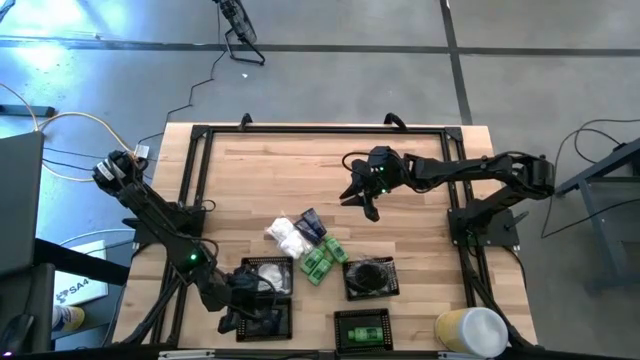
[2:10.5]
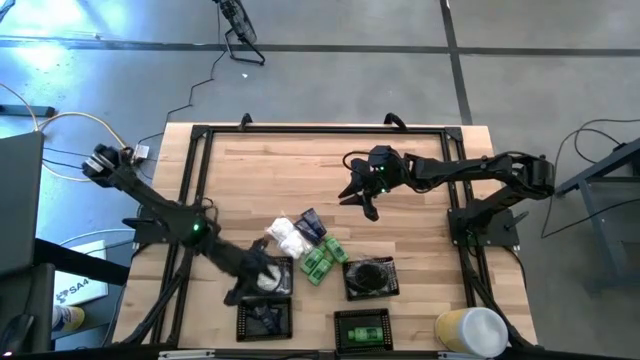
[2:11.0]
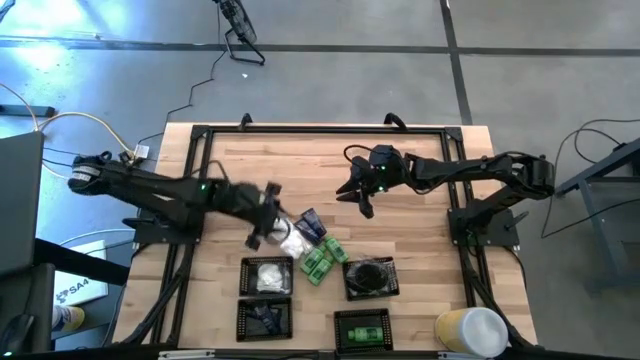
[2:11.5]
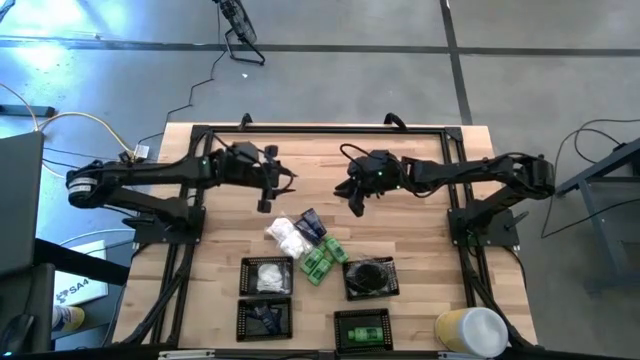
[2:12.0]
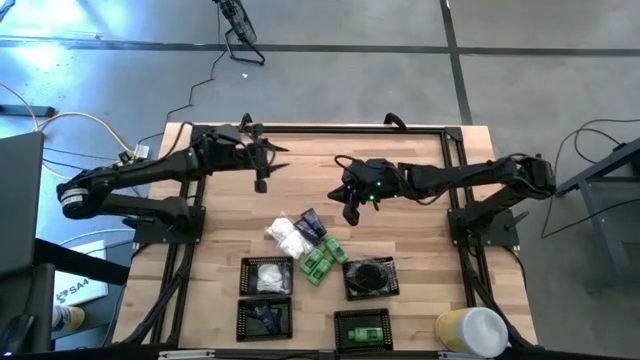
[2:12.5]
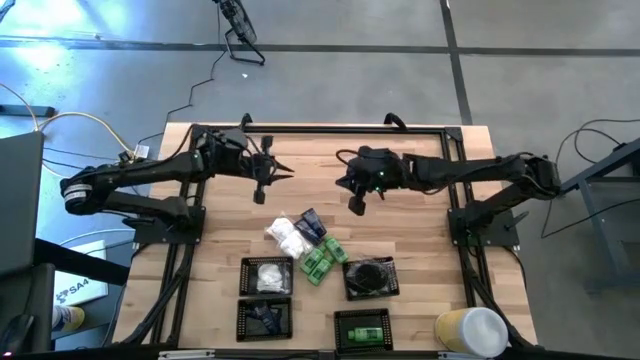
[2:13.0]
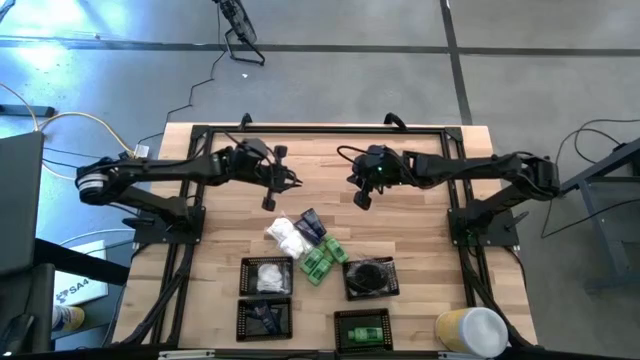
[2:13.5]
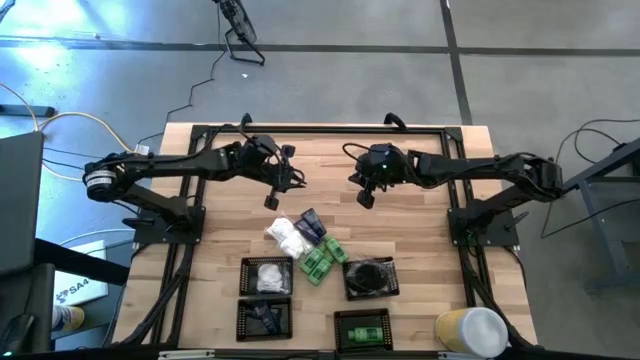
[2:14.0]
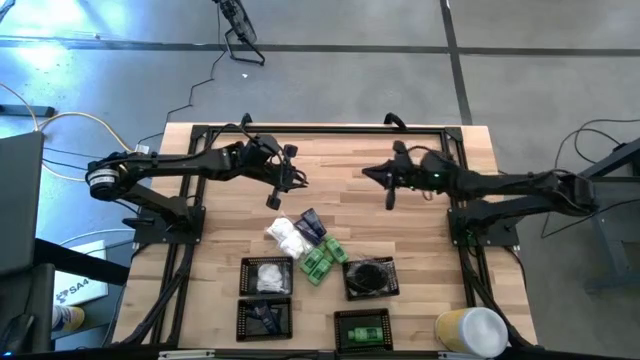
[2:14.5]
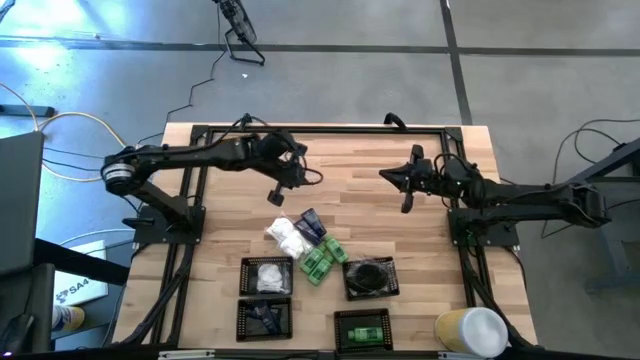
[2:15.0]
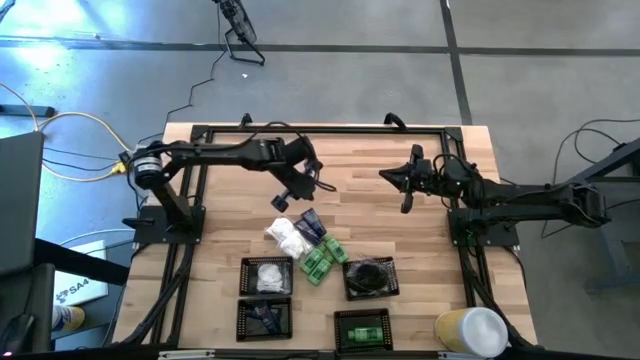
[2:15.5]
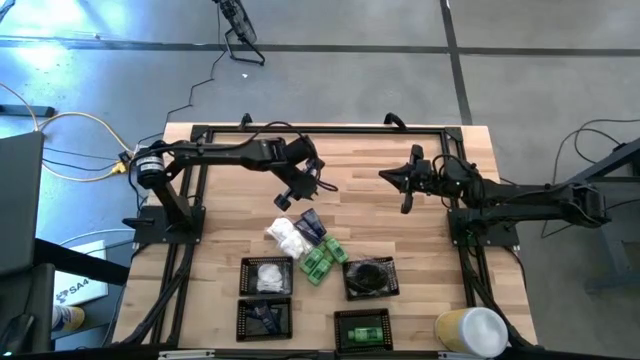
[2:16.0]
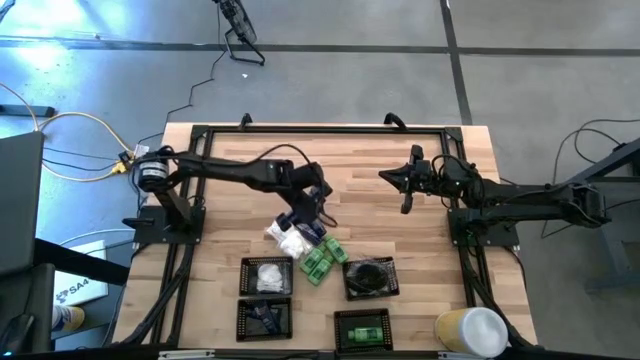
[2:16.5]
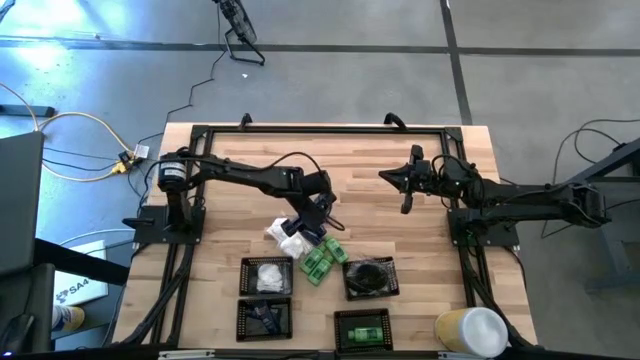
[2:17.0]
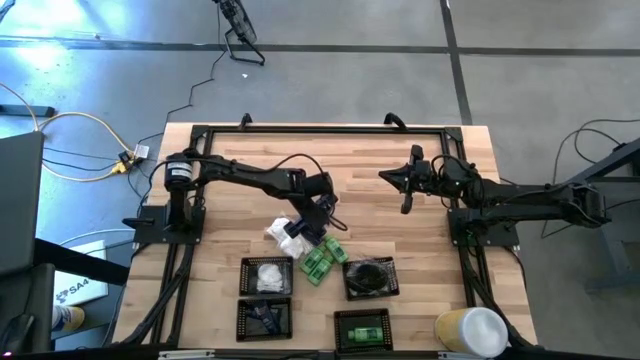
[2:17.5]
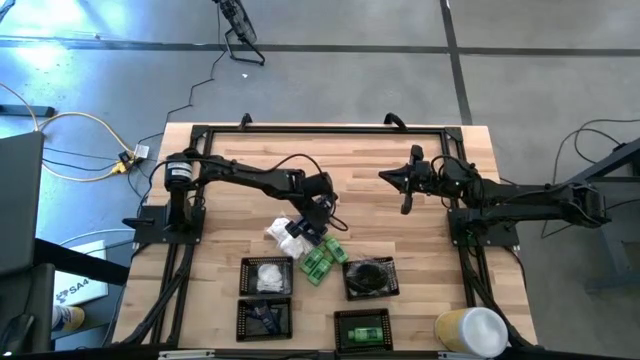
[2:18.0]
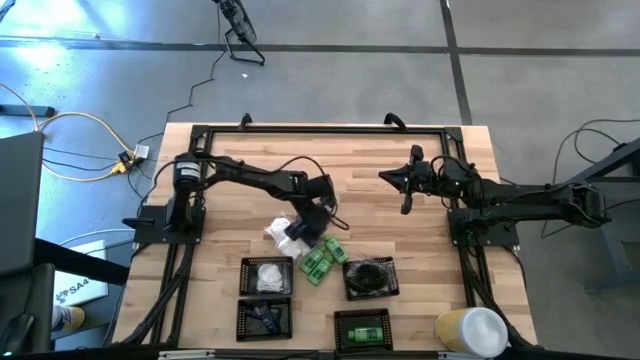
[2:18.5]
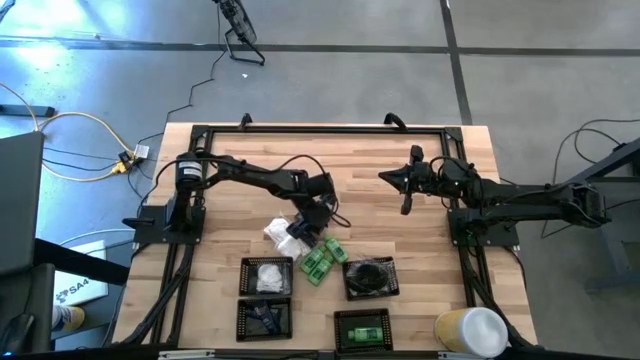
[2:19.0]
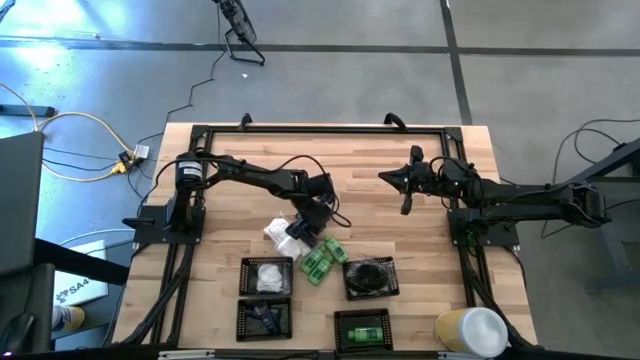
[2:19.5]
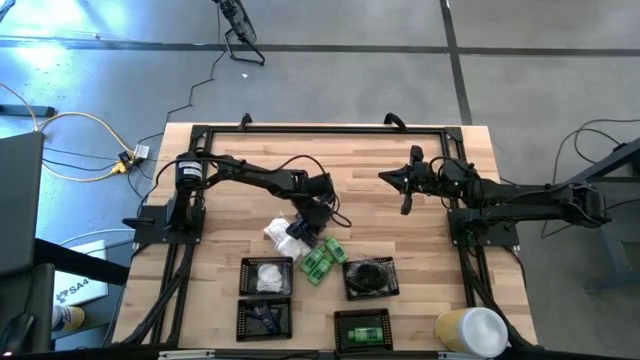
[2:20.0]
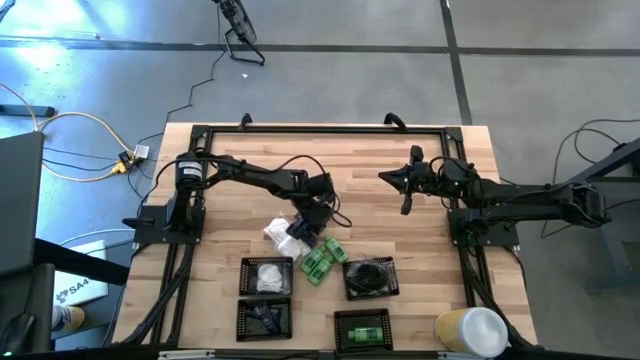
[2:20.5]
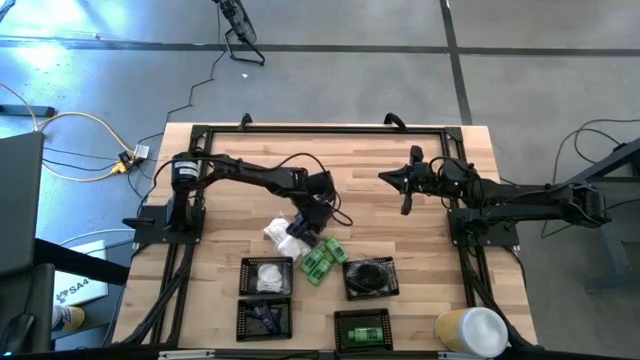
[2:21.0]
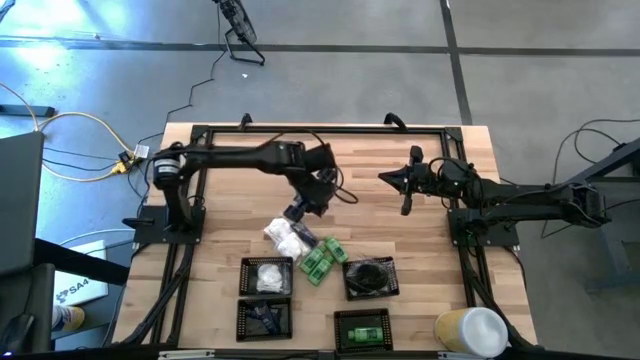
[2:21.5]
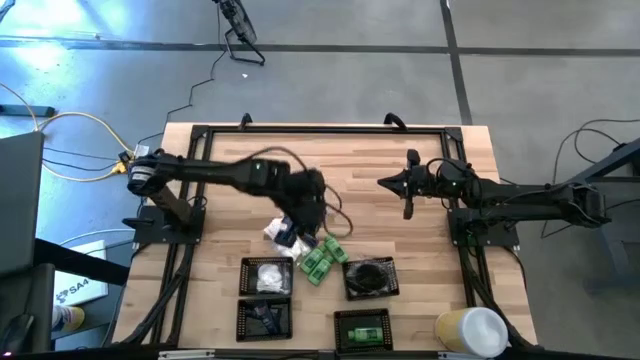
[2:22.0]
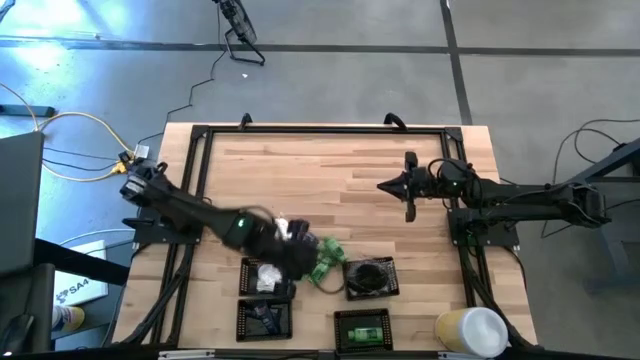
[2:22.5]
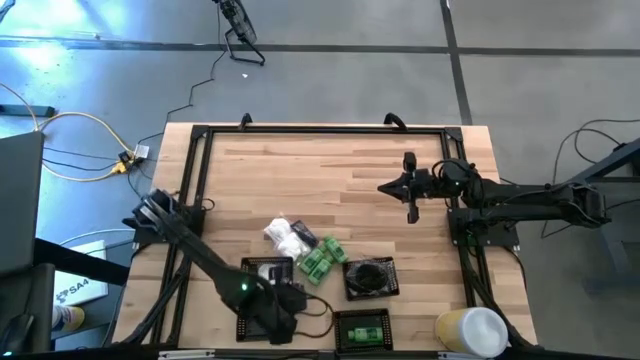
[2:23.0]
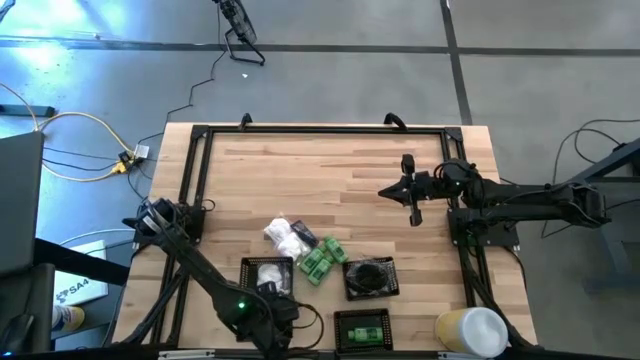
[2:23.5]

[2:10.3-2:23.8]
Task: Pick & Place Travel size toiletries
Put the black shaving cream into the bottom left black bin

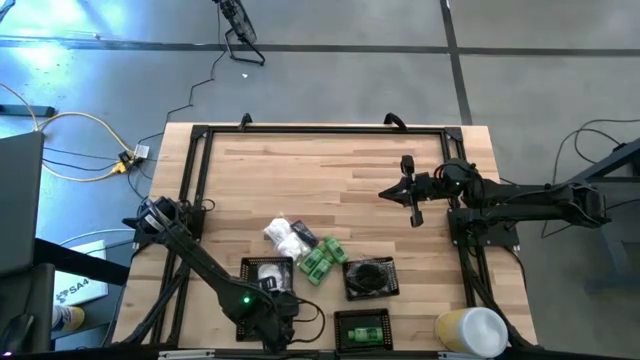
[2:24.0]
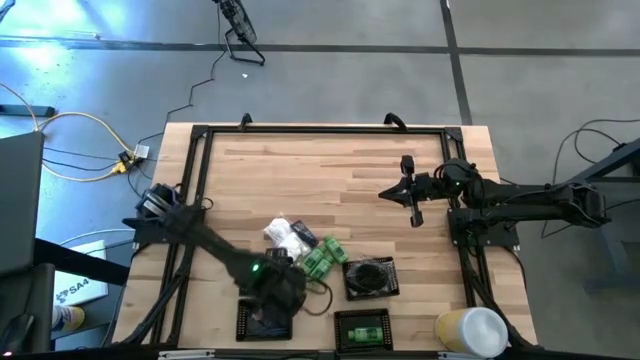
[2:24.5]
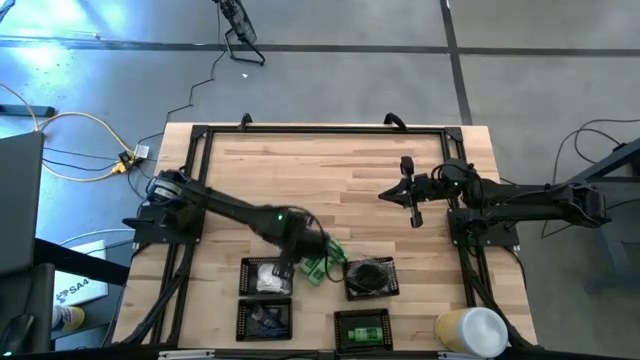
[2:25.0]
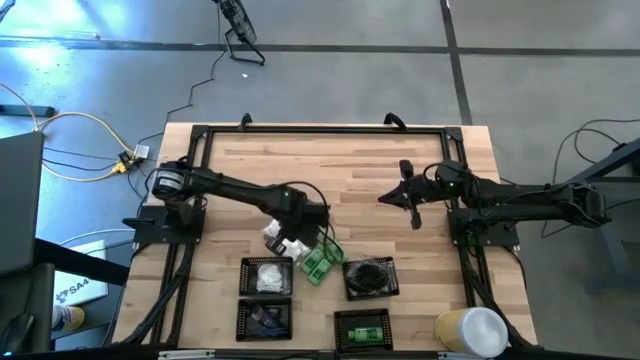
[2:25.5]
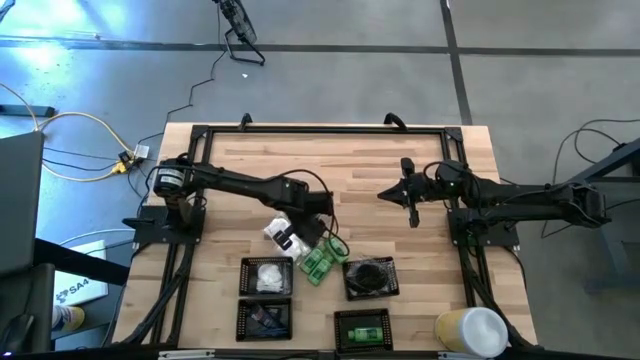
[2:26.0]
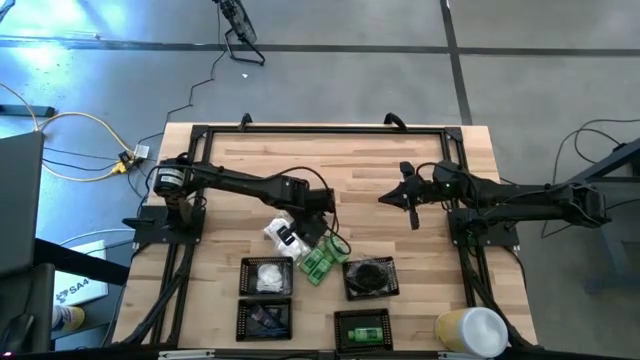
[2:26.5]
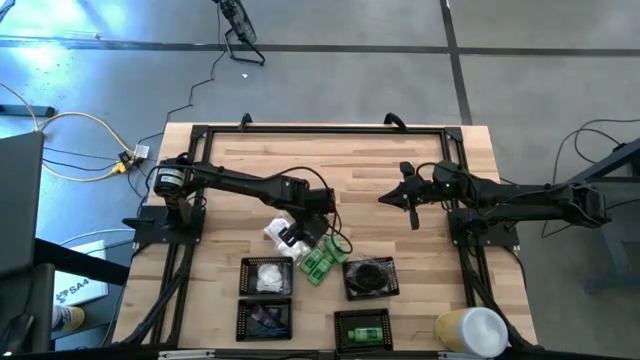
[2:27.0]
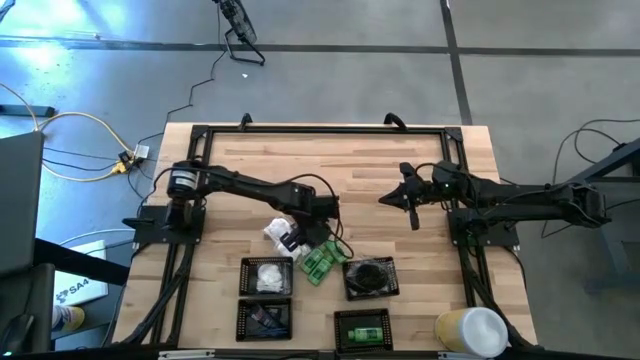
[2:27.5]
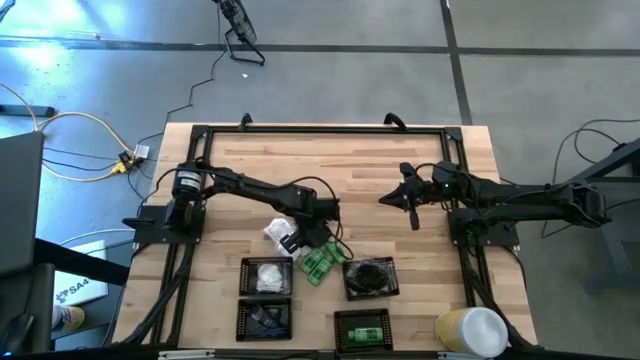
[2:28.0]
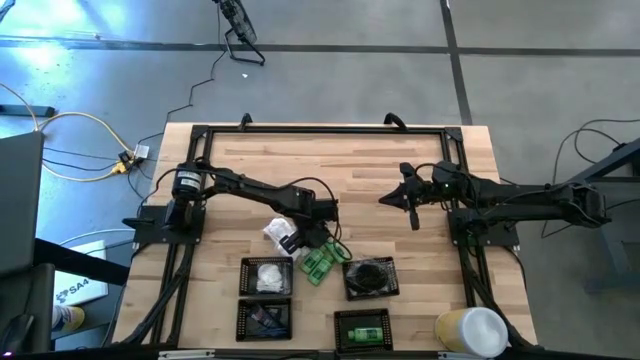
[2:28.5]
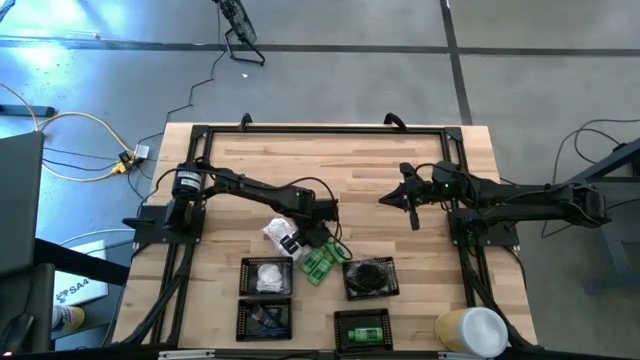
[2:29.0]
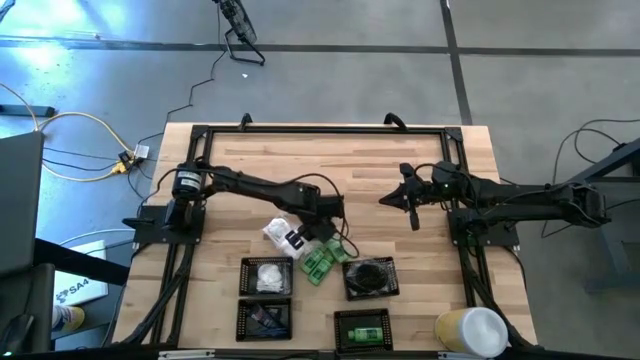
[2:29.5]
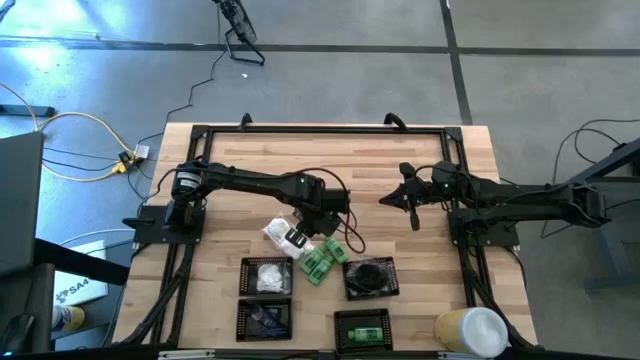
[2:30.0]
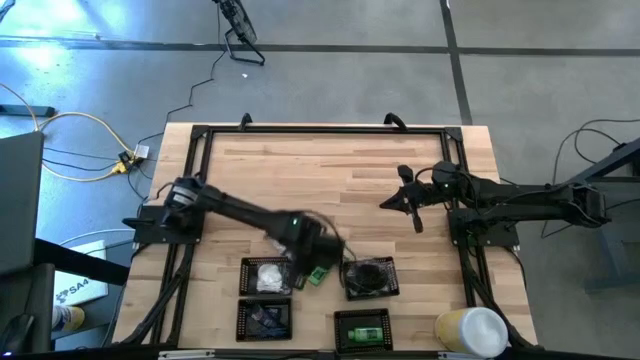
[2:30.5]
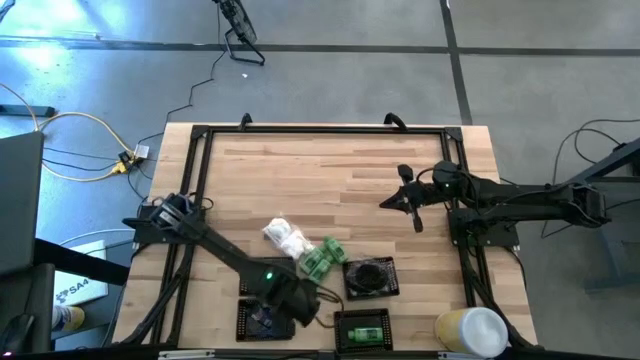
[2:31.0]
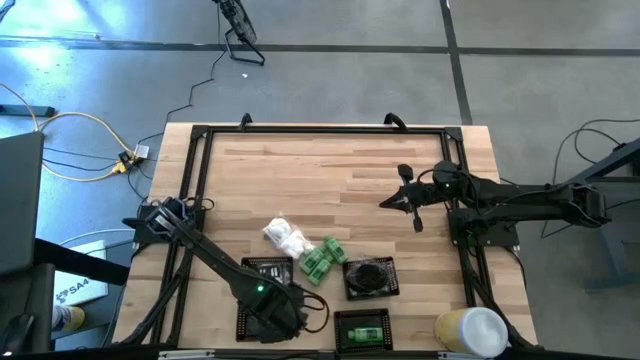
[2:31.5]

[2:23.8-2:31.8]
Put the black shaving cream into the bottom left black bin
